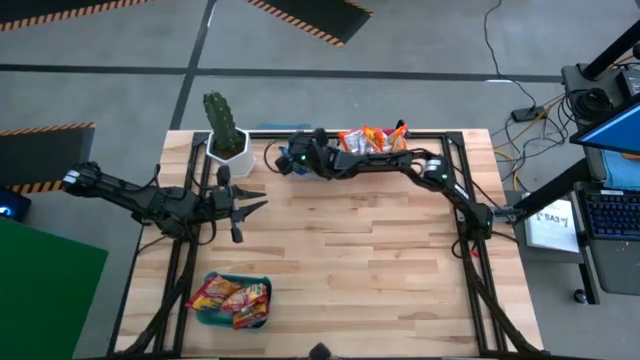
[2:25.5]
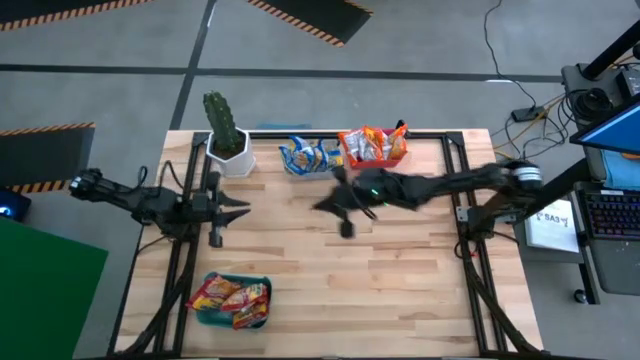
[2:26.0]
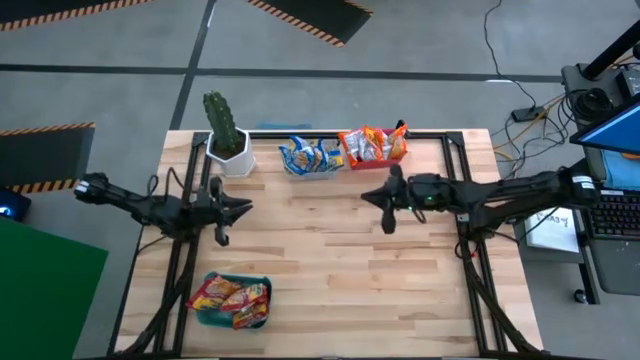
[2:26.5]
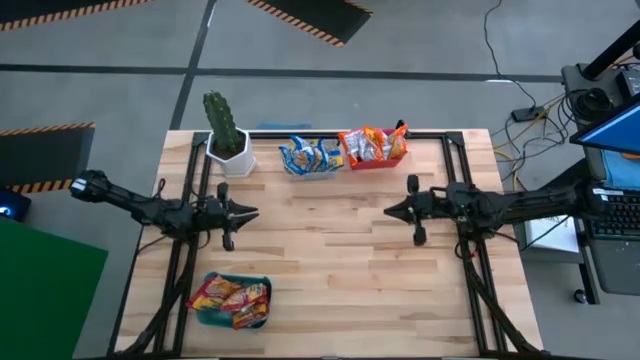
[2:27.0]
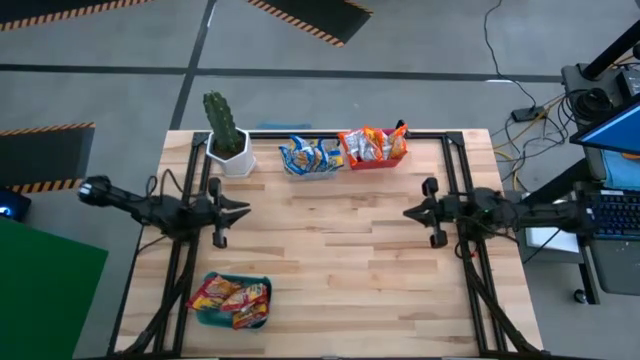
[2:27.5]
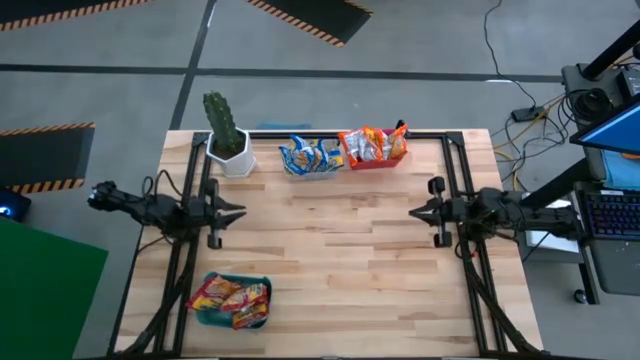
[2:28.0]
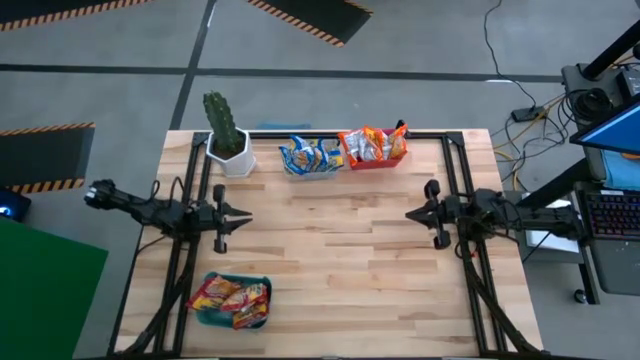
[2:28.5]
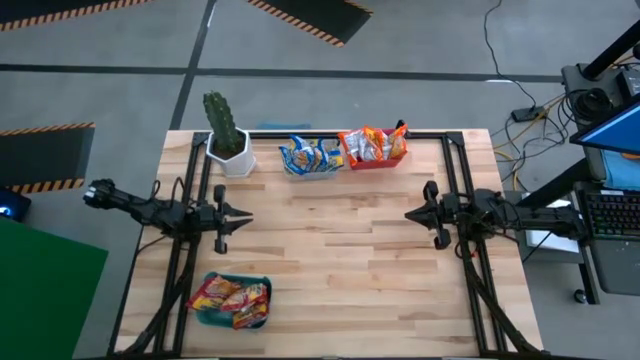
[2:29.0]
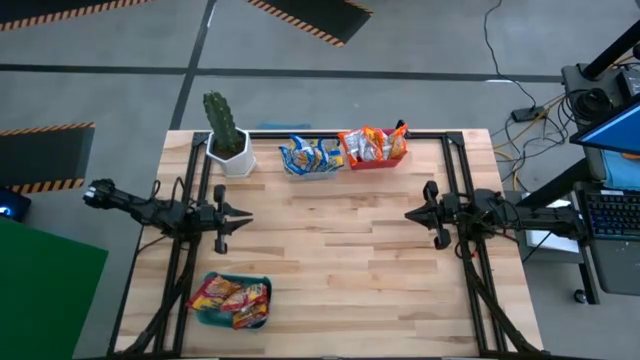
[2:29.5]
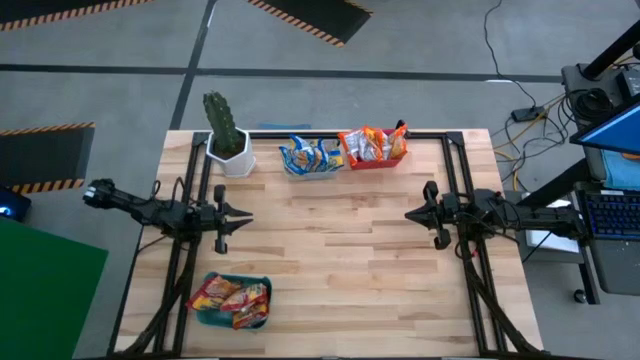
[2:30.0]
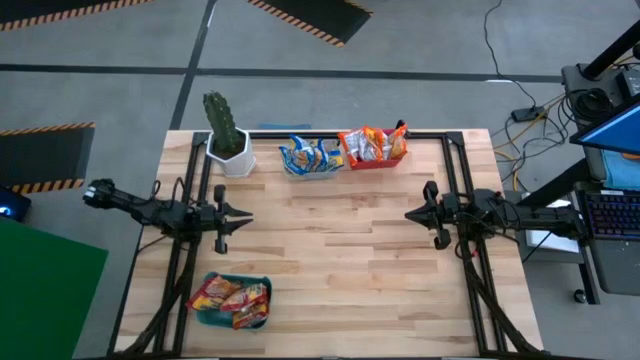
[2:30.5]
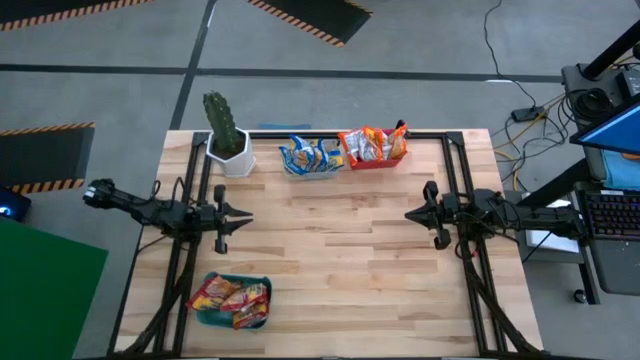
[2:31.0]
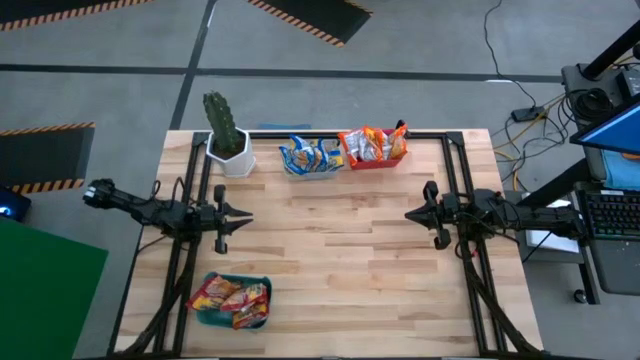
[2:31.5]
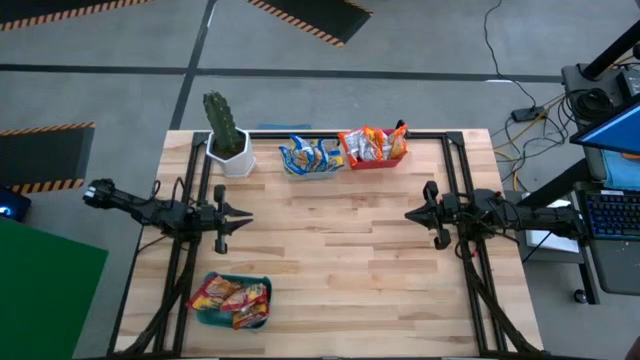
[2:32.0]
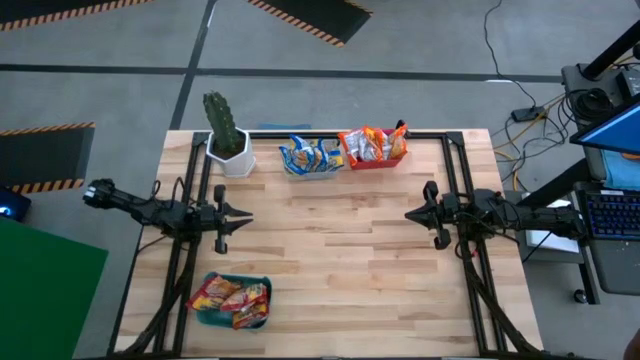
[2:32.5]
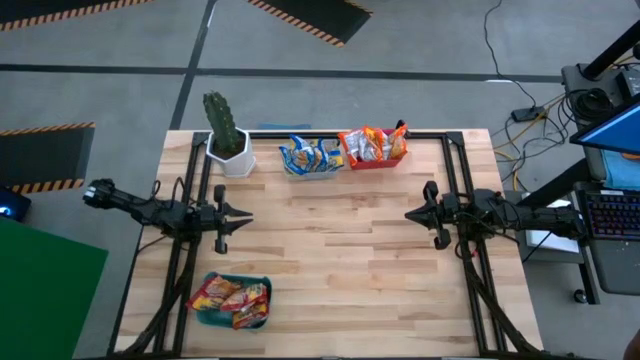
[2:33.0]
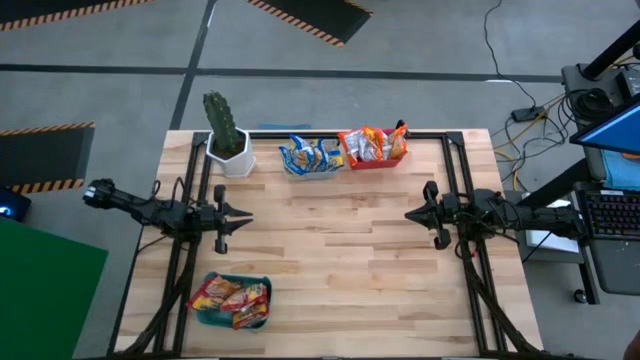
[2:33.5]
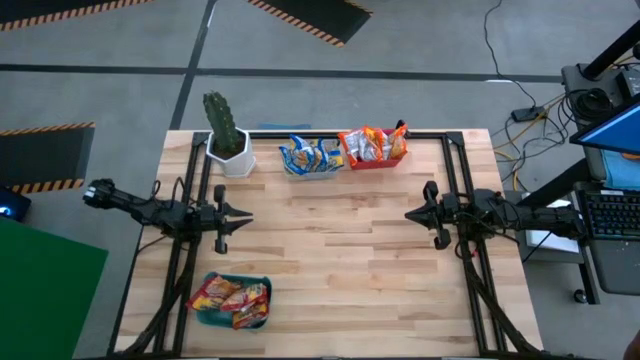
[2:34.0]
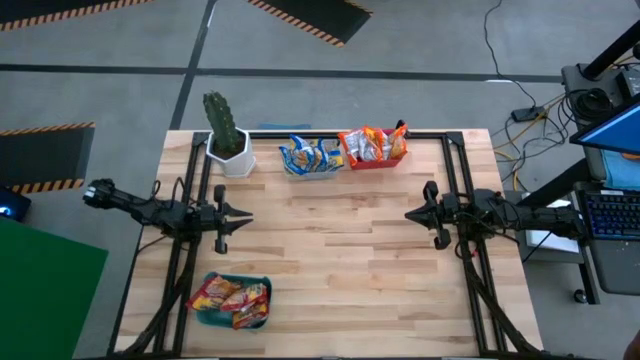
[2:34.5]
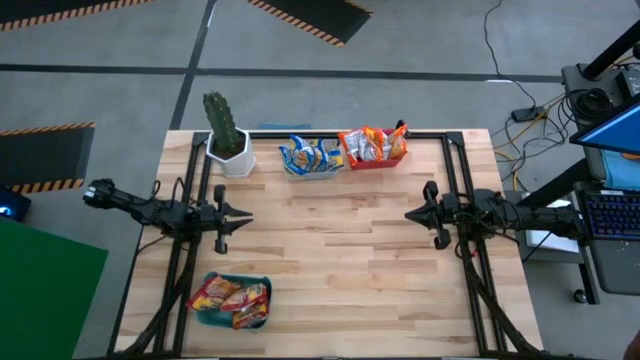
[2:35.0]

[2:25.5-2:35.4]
Task: Sort Maruchan noodles
Return to Home Position

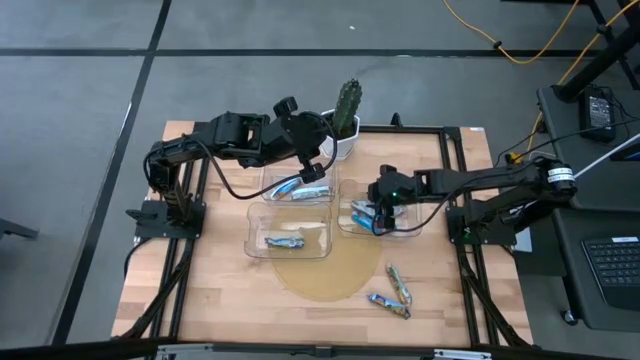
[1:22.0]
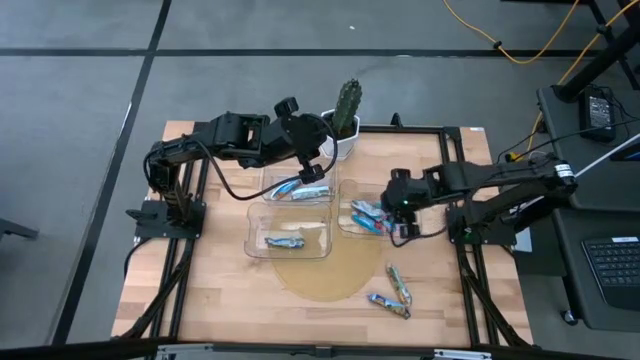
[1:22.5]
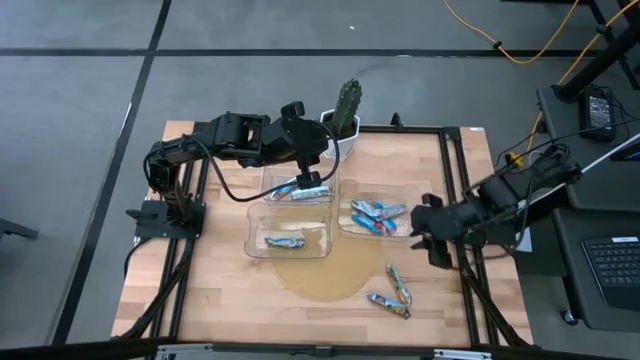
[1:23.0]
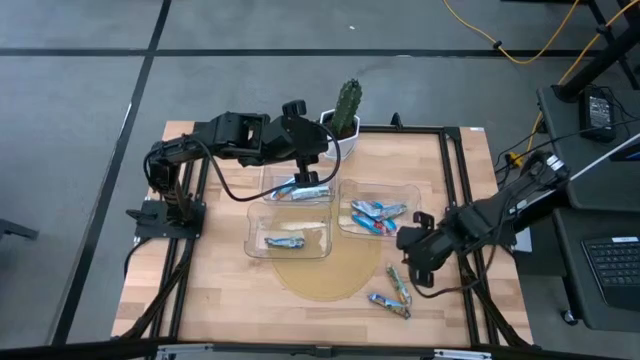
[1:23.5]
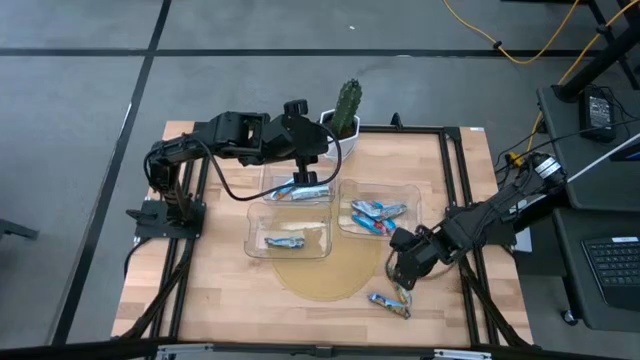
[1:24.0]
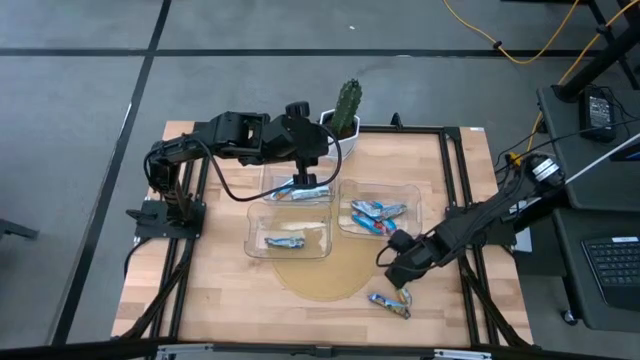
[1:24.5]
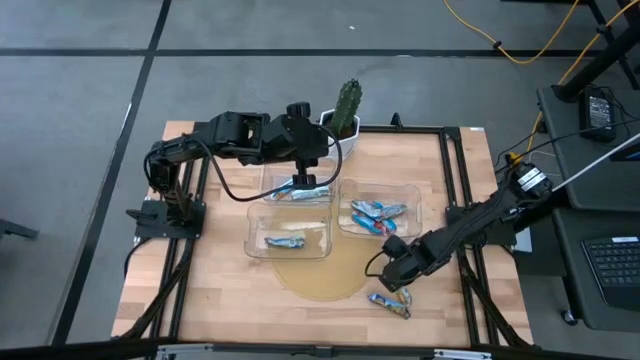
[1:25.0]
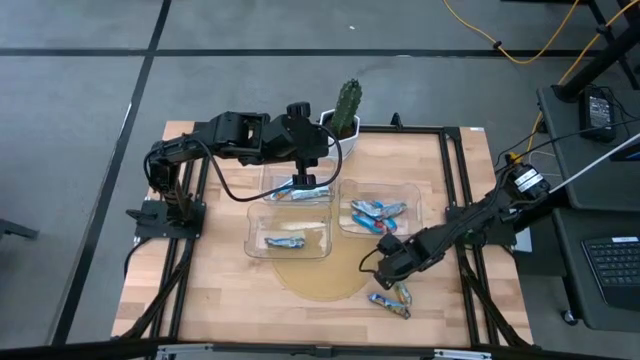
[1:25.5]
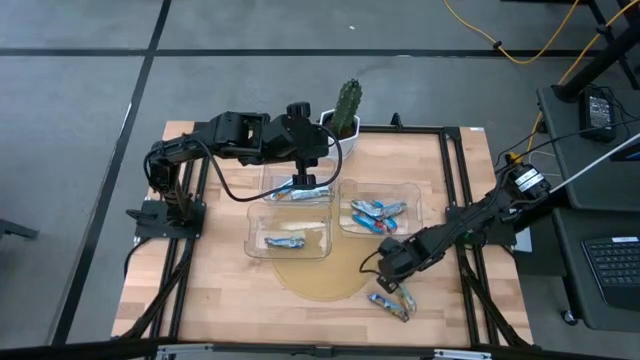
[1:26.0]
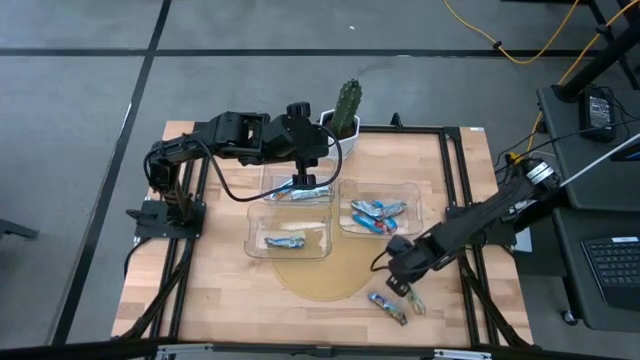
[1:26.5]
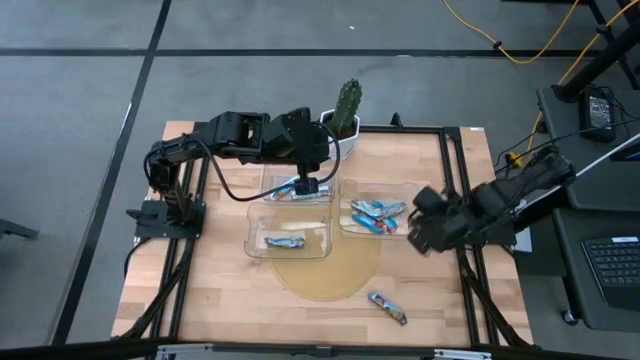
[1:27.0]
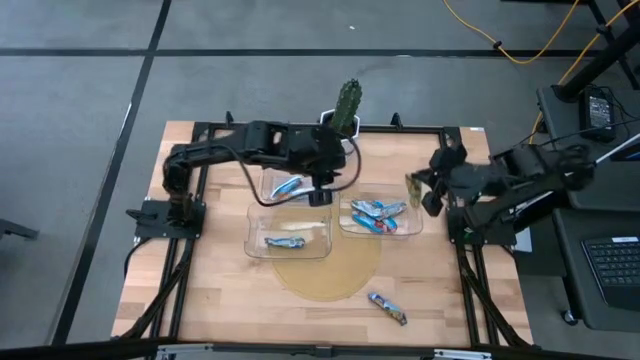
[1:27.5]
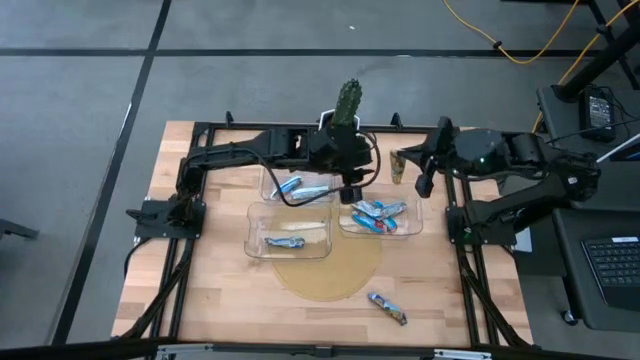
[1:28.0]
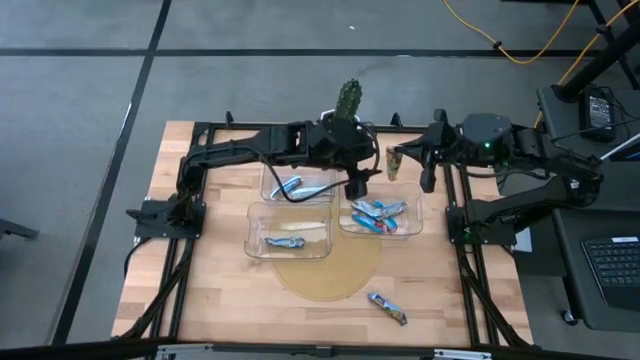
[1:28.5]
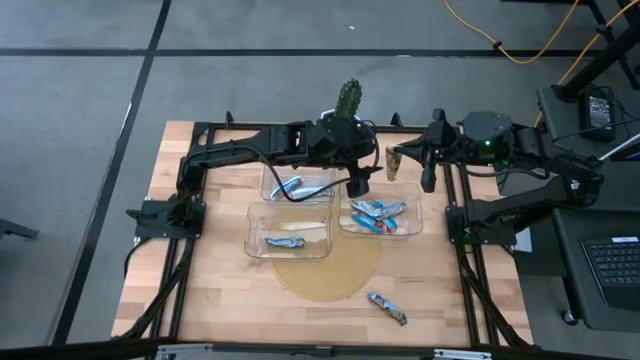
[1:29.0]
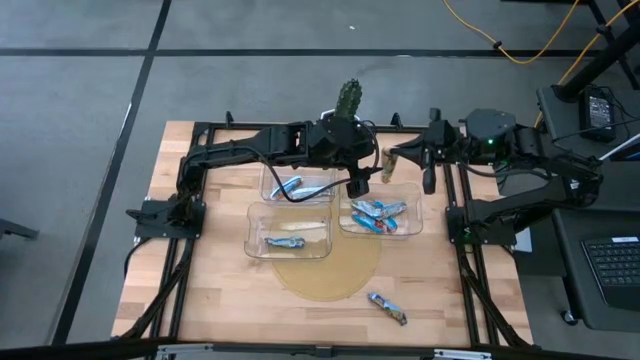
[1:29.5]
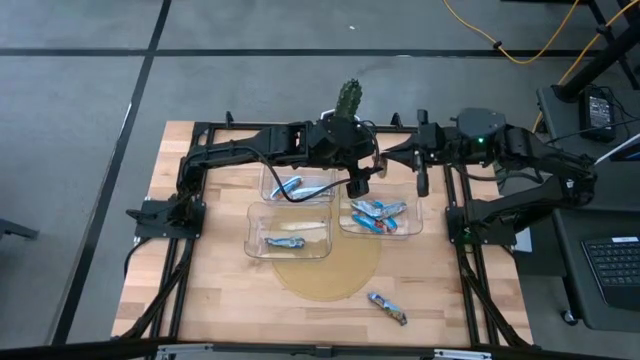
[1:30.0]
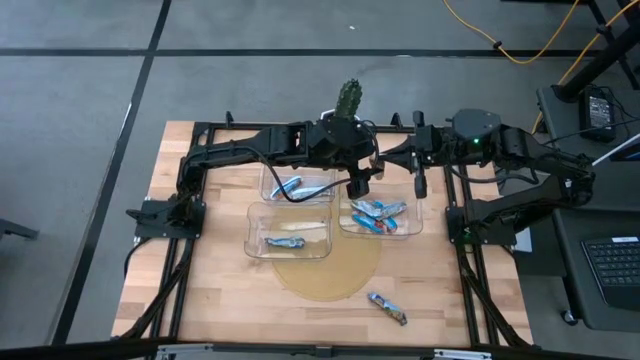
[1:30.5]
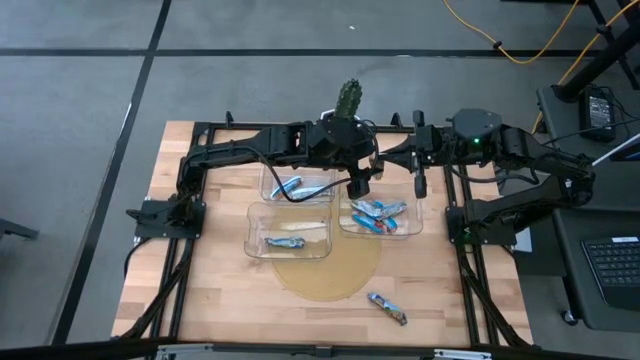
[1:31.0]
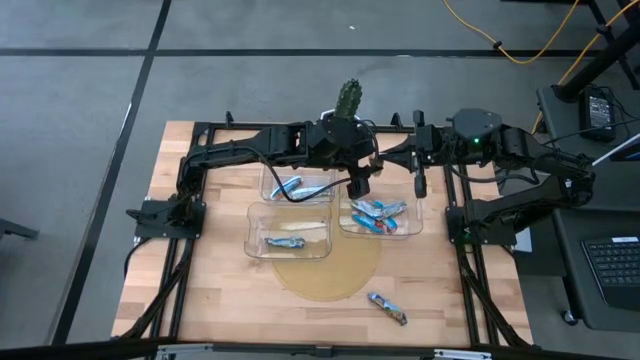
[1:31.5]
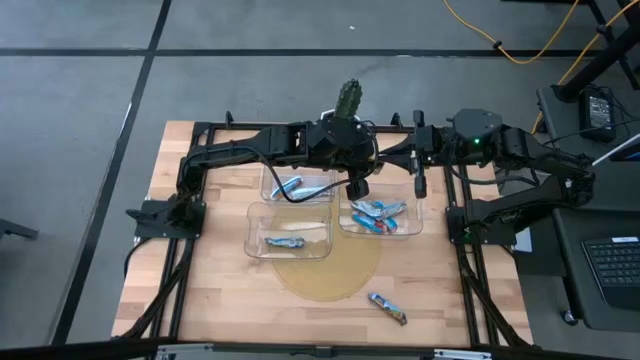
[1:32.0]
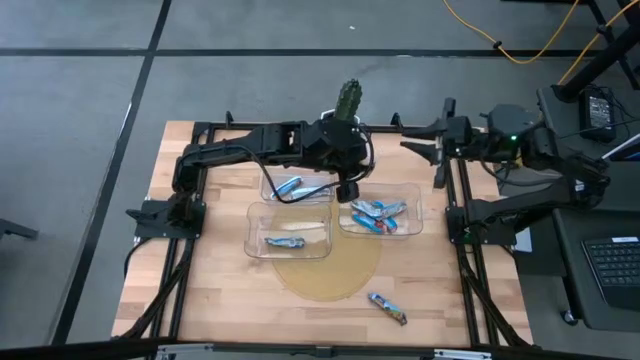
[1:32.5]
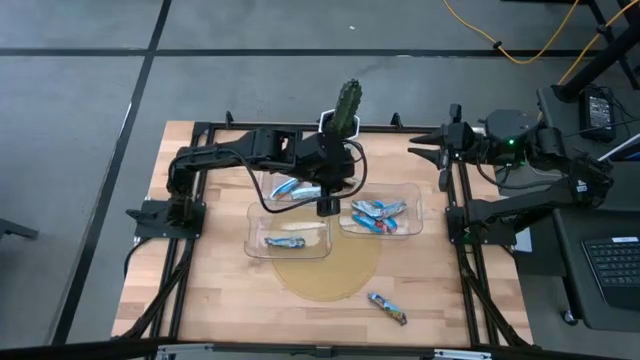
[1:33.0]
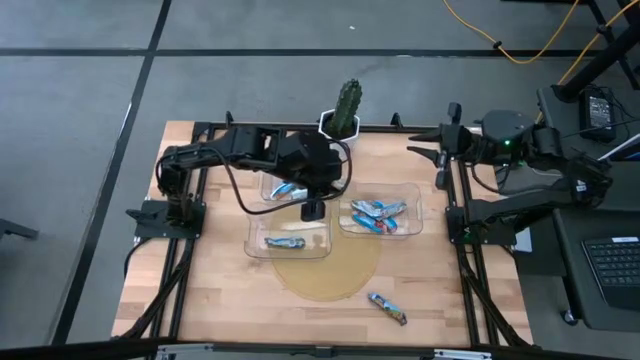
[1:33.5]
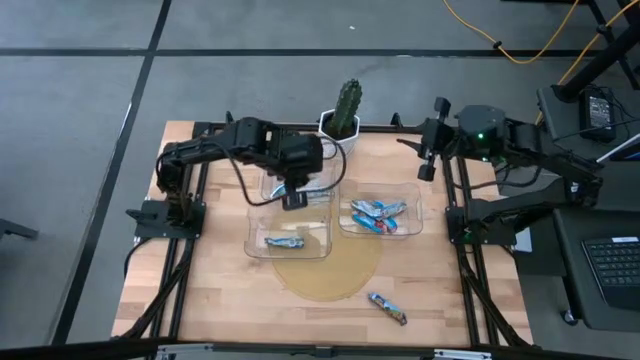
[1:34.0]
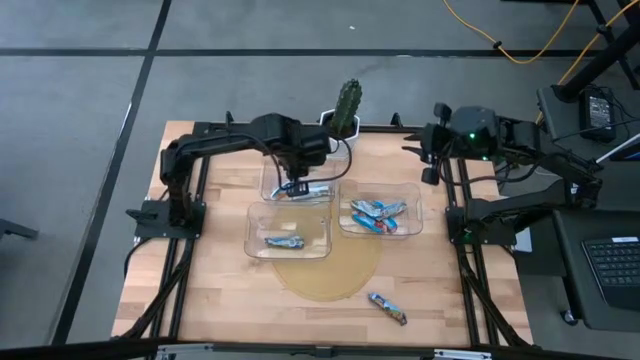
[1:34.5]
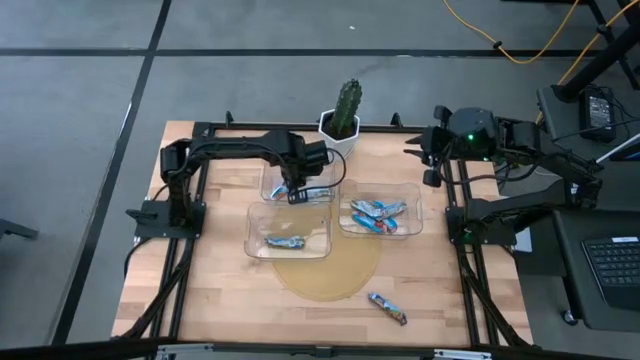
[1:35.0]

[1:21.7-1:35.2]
Task: Pick and place Granola Bars by type
Put the yellow granola bar into the top bin
